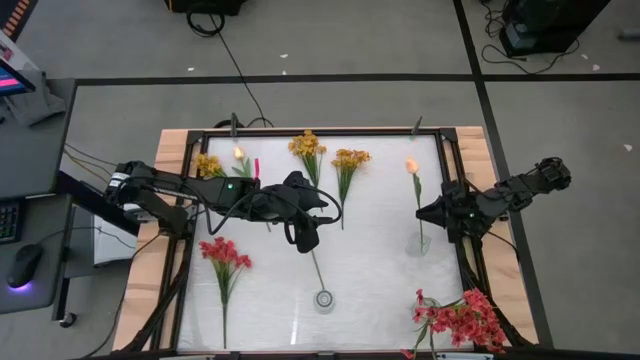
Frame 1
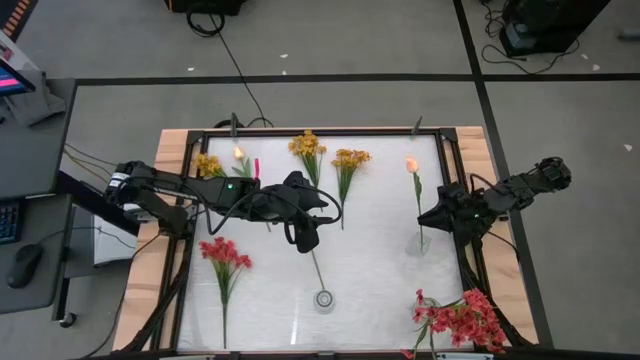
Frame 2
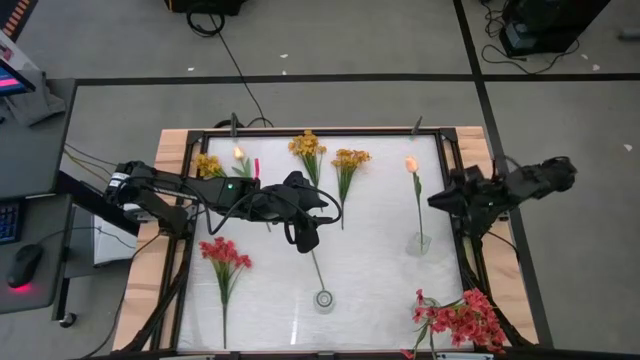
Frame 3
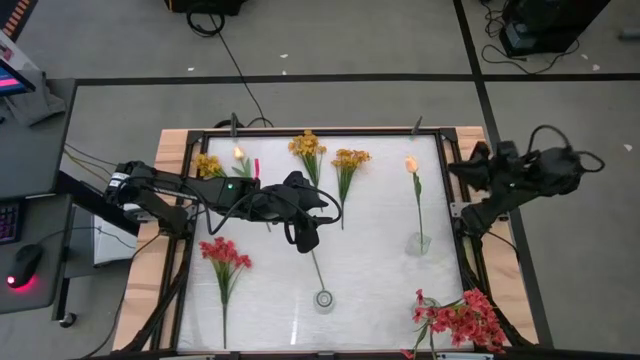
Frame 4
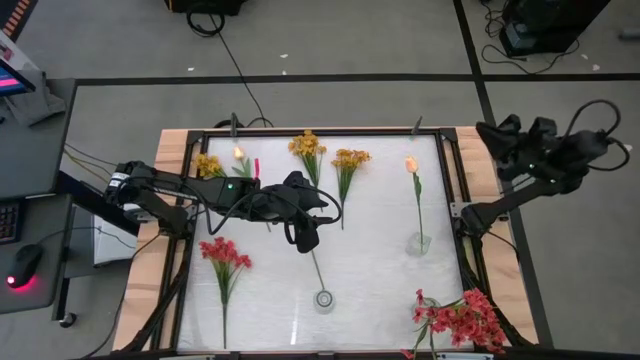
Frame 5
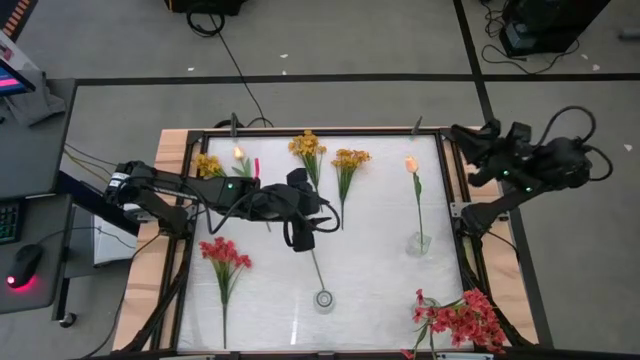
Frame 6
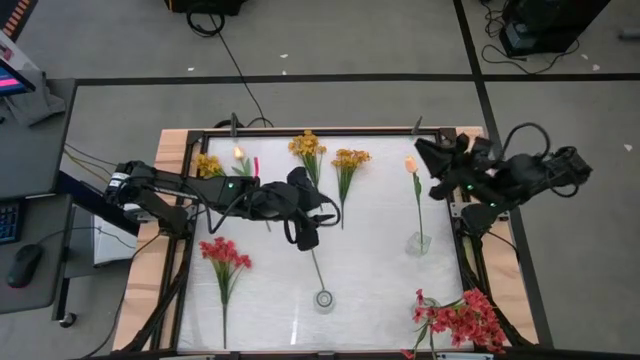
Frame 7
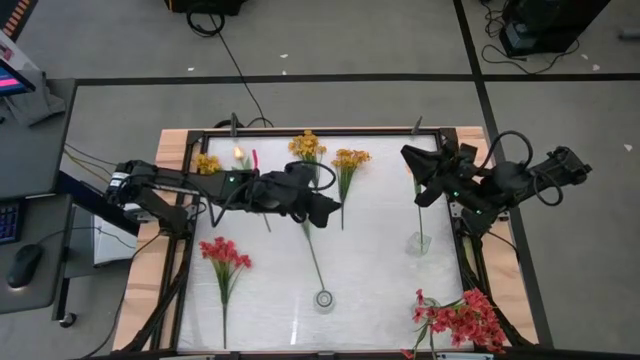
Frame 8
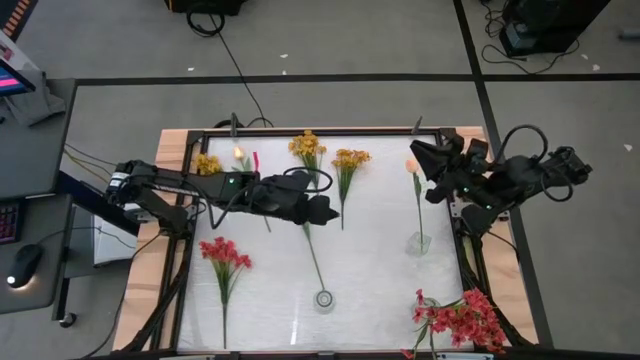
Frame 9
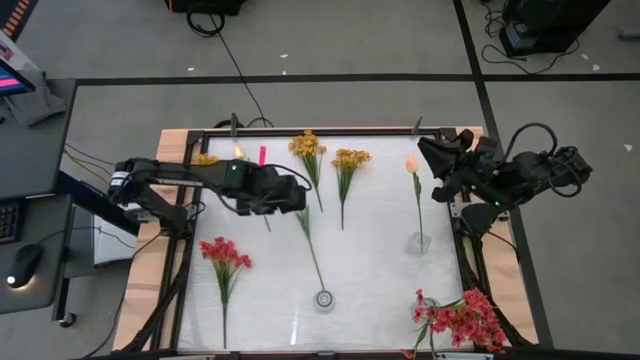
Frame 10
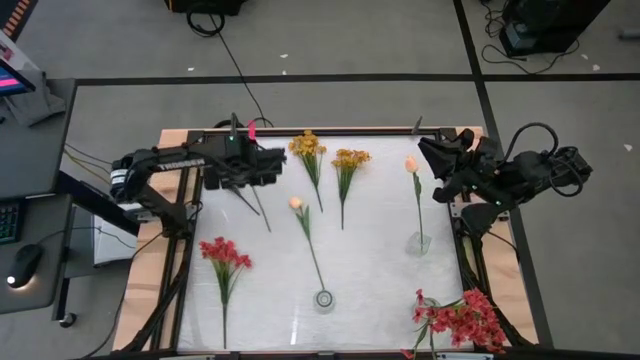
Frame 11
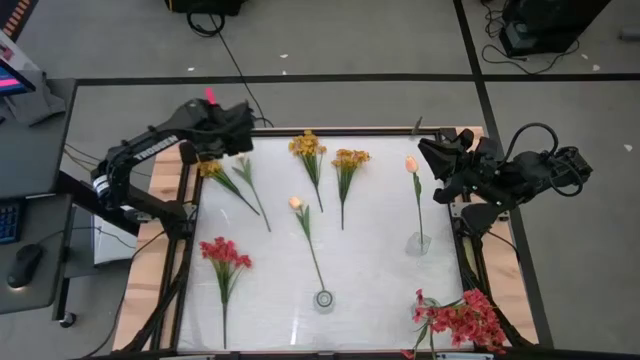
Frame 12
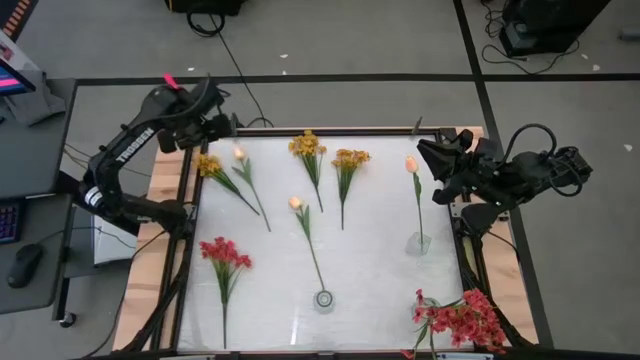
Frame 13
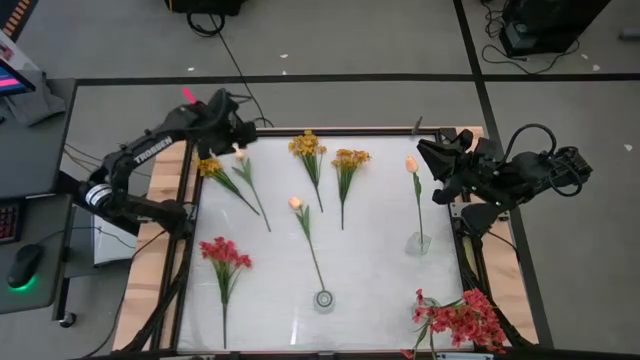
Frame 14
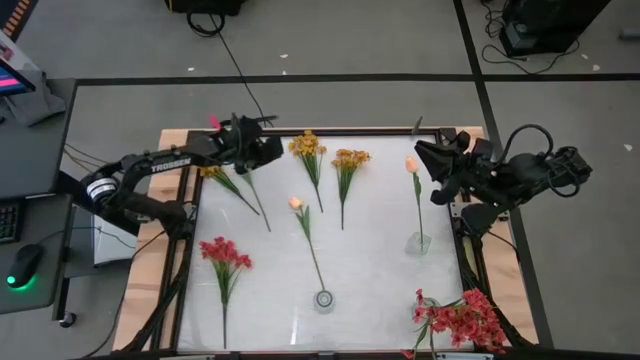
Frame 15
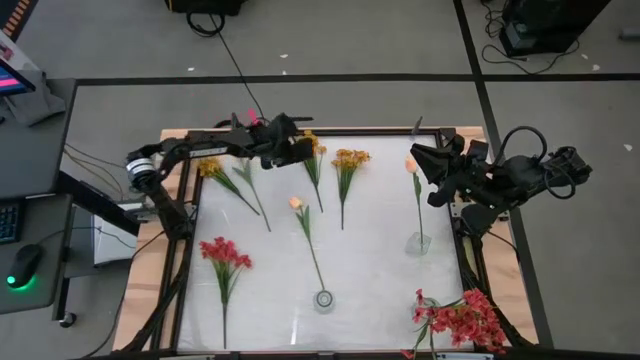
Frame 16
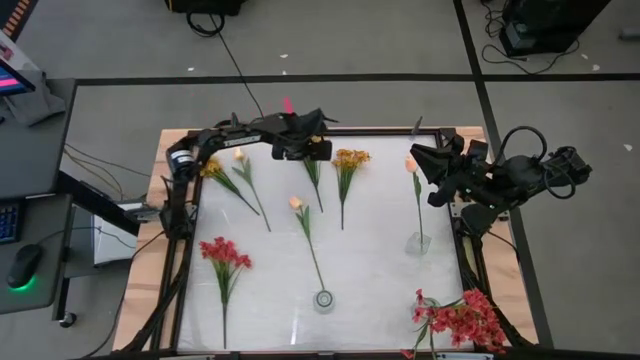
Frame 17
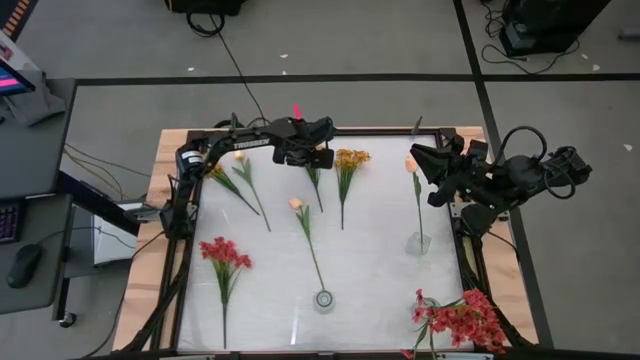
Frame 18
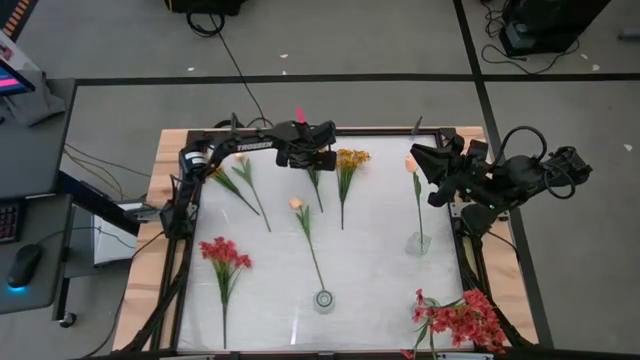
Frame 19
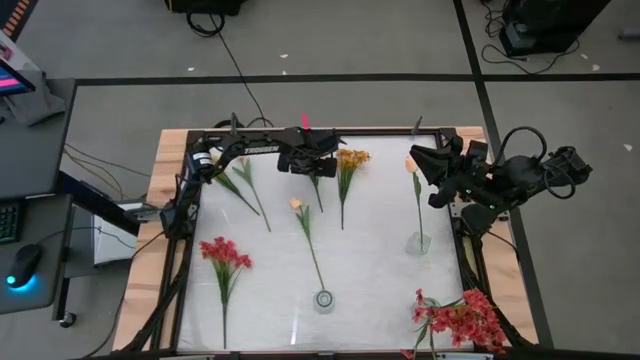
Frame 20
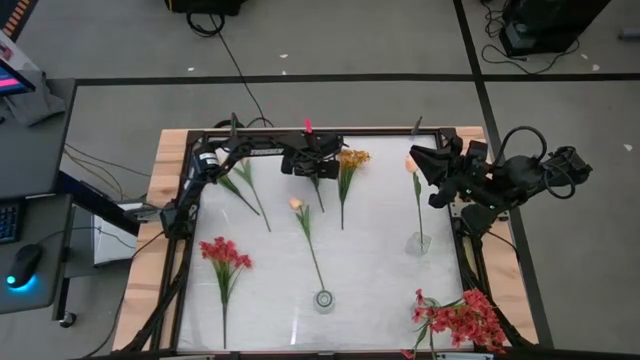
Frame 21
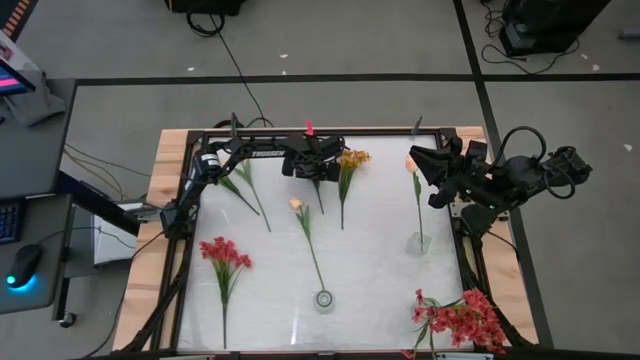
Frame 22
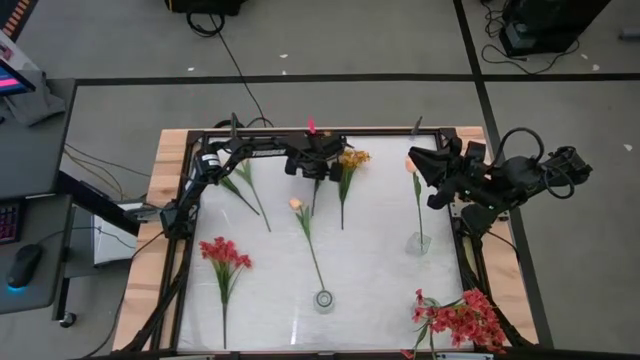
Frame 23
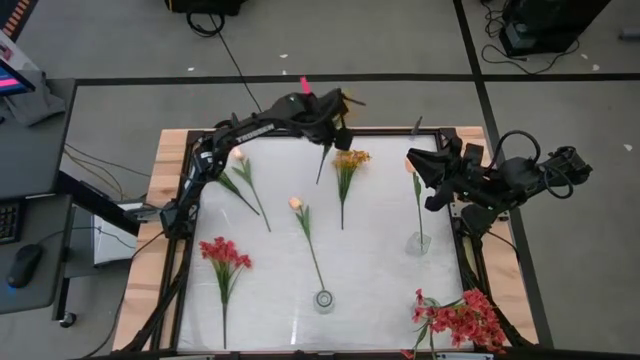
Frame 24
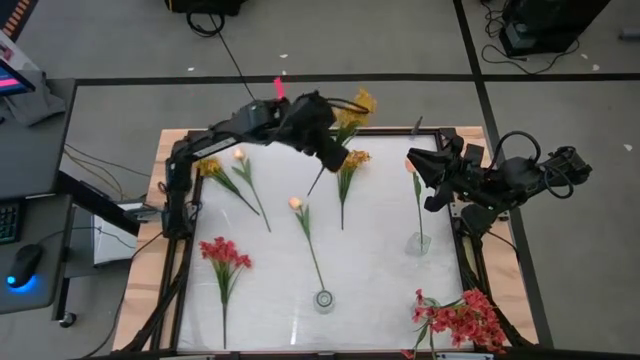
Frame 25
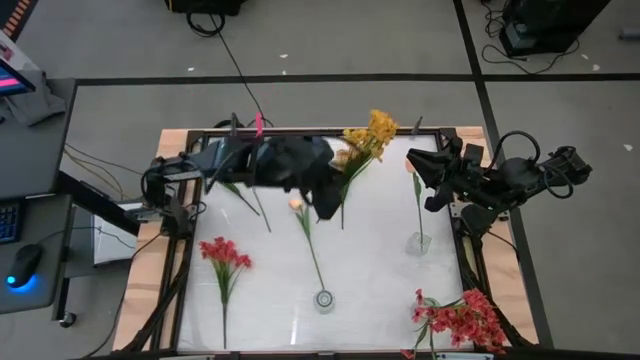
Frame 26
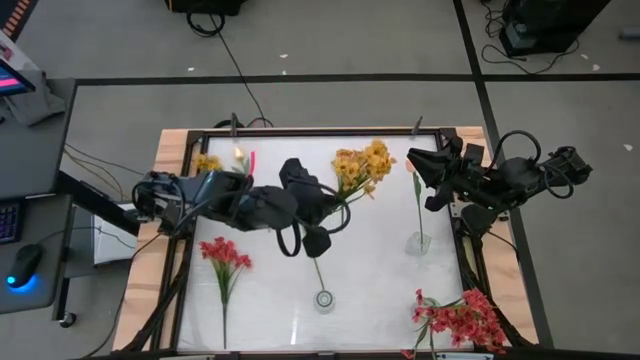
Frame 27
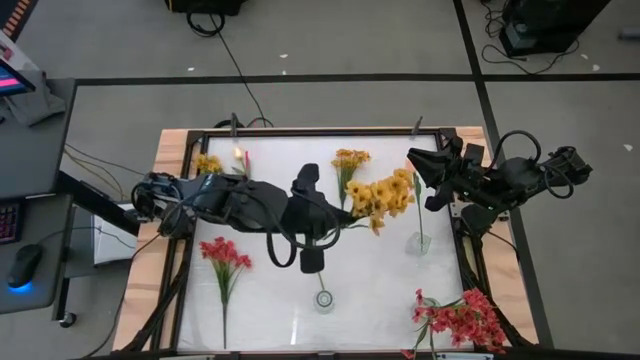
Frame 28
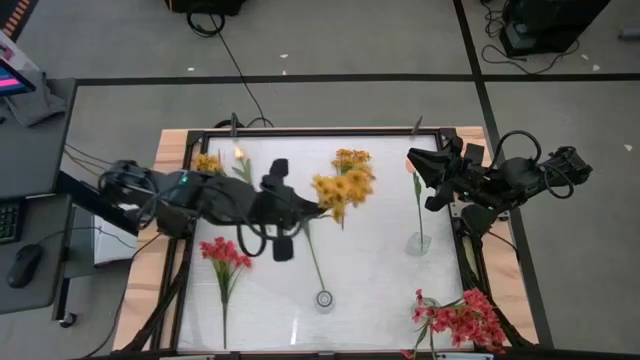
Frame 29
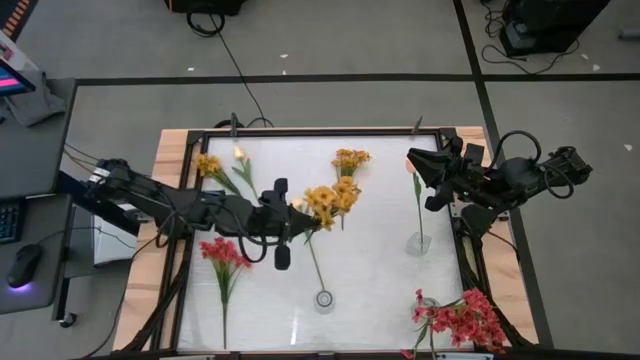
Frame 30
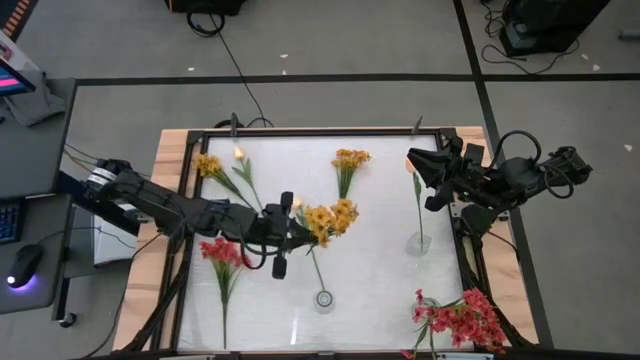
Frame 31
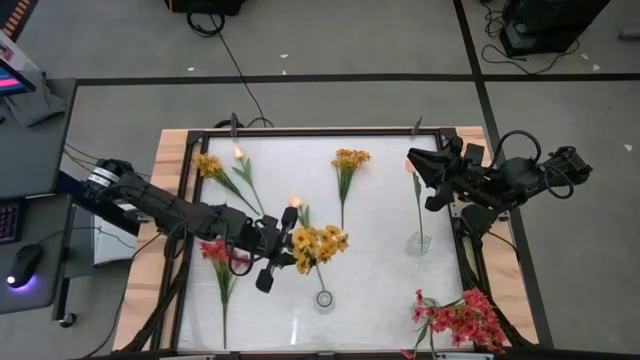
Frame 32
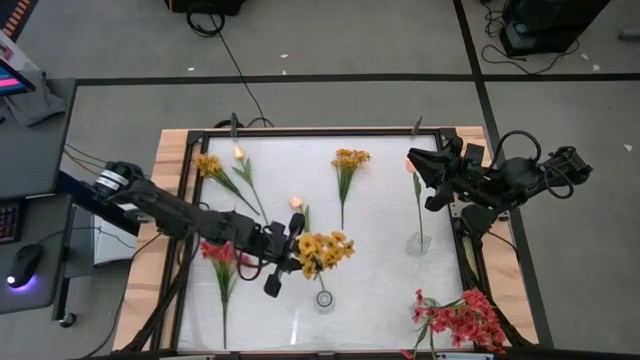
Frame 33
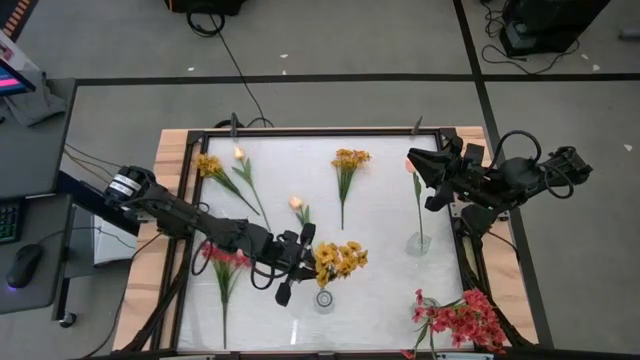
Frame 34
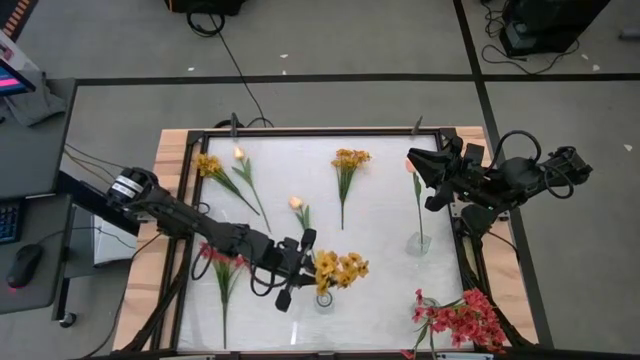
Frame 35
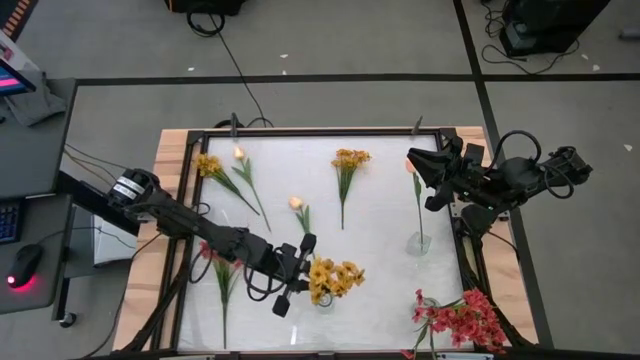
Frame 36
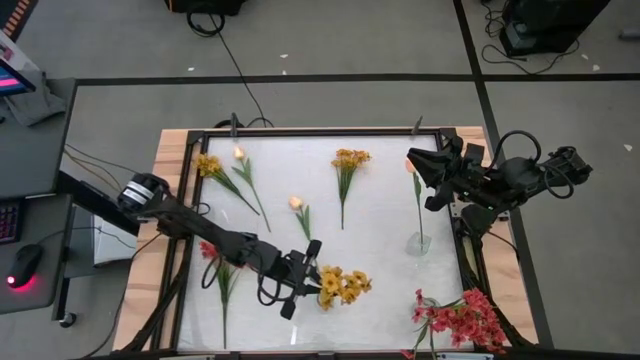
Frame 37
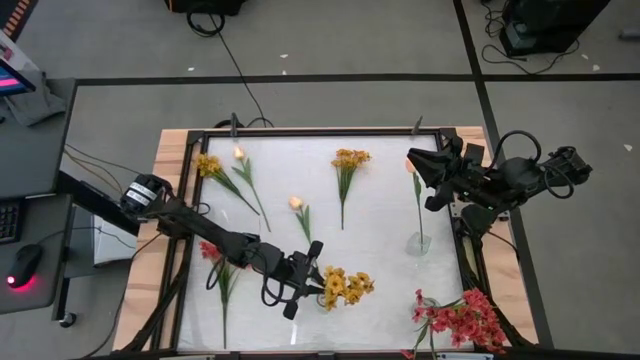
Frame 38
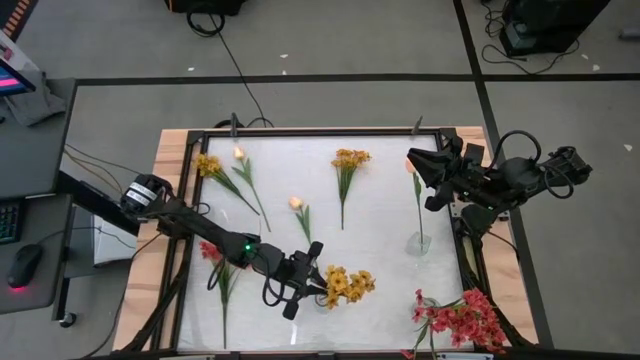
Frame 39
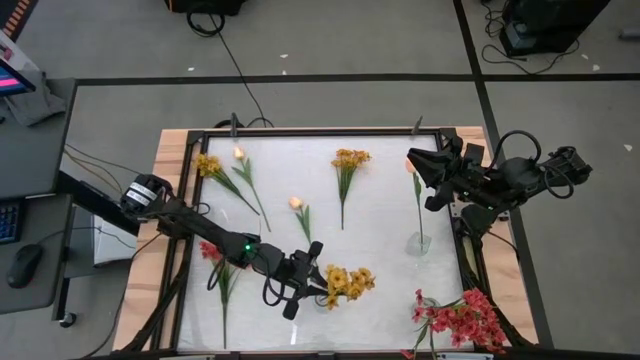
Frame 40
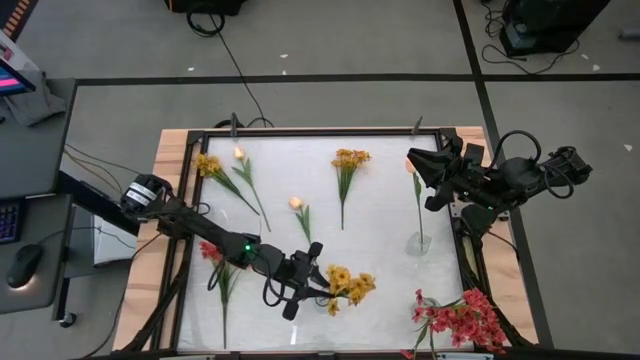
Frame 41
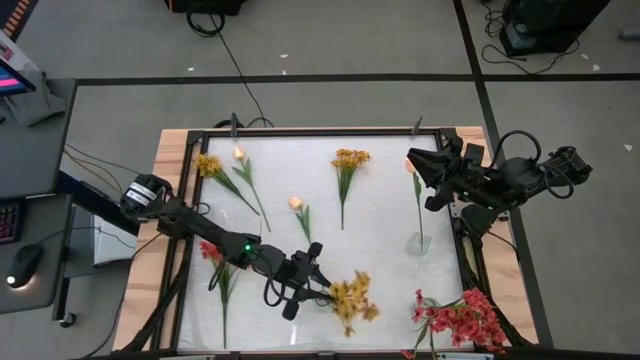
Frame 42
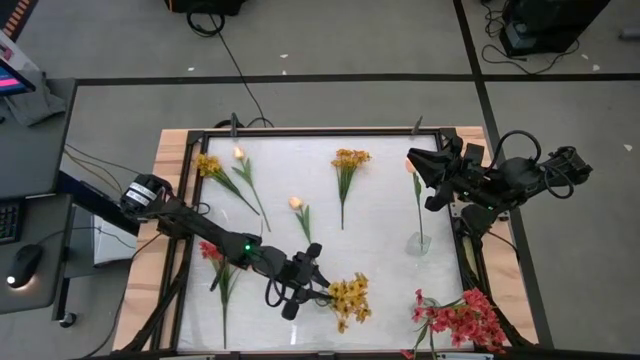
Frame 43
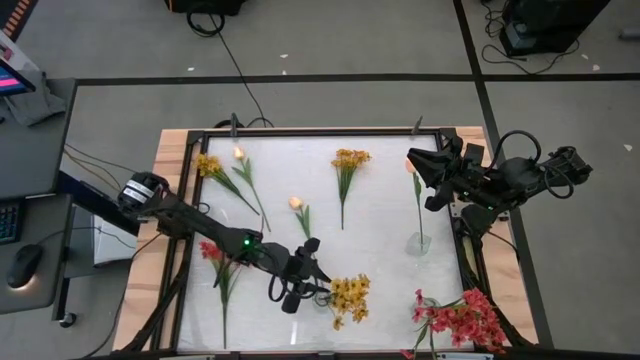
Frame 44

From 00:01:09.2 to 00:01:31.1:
Task: Sort flowers into vase by color
Put the middle yellow flowers into the bottom left transparent vase

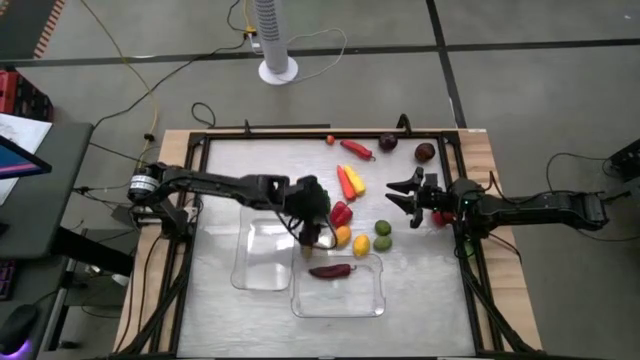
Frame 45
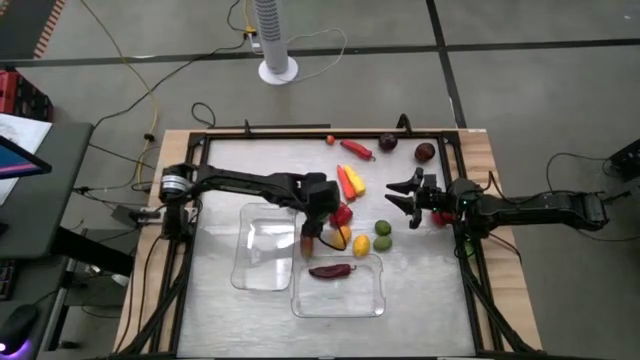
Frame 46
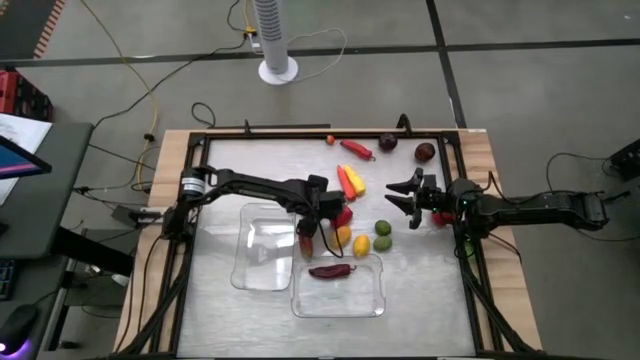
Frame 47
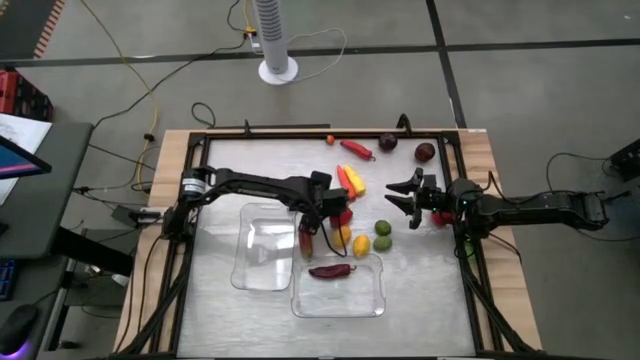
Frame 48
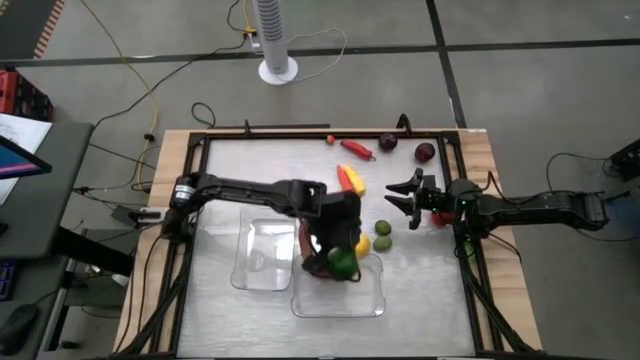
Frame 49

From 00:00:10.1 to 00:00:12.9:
Task: Sort produce into baskets
Put the green bell pepper into the right transparent bin
